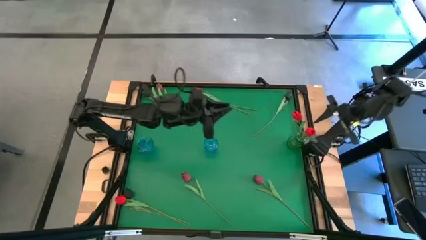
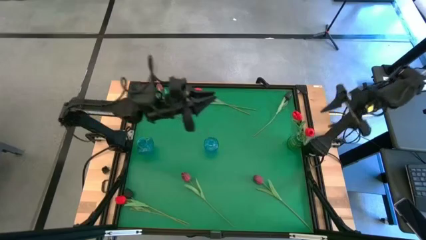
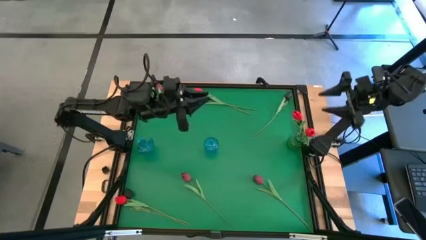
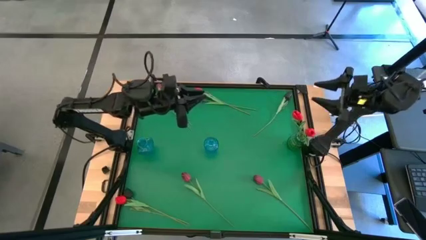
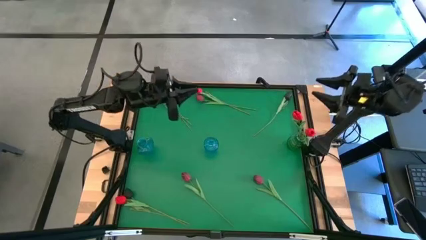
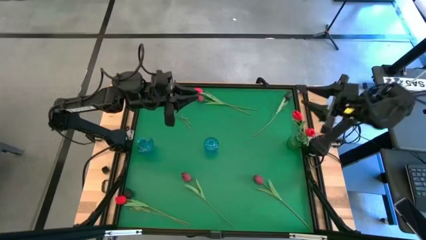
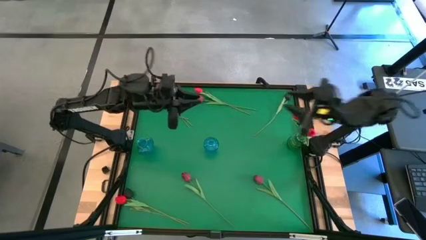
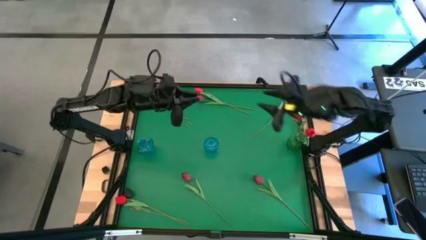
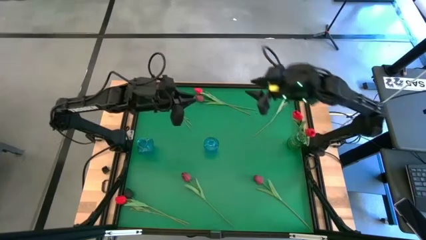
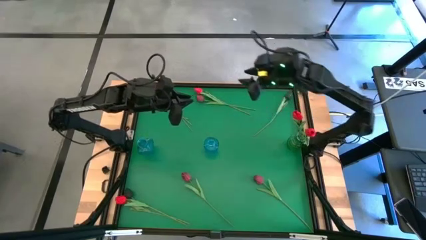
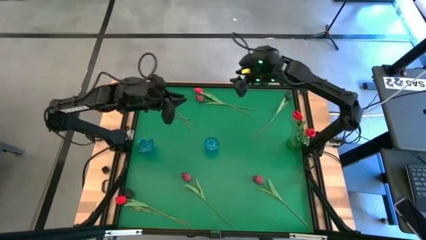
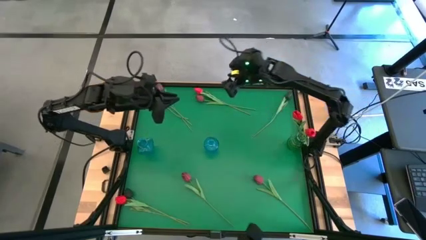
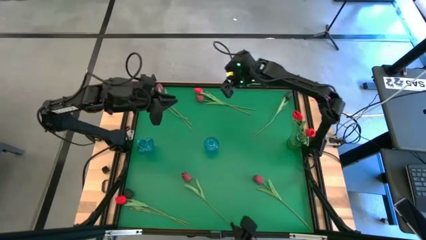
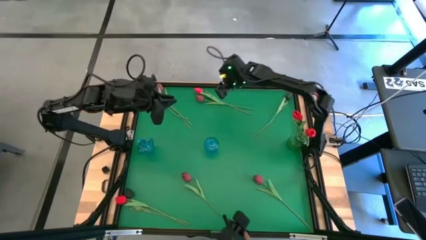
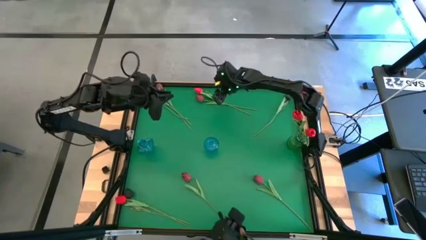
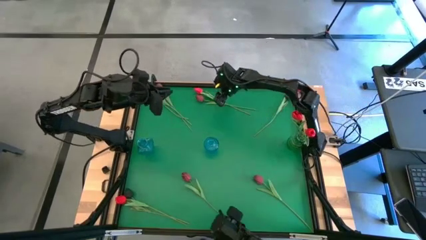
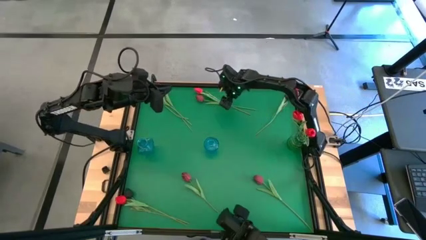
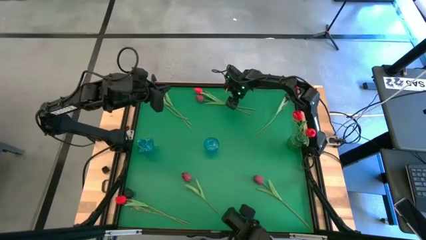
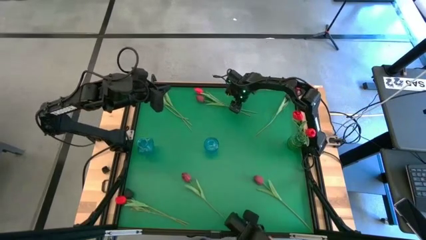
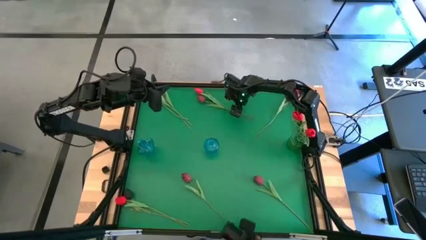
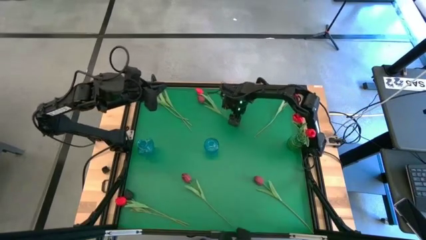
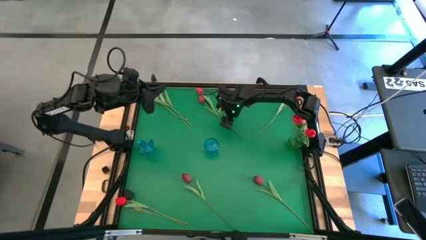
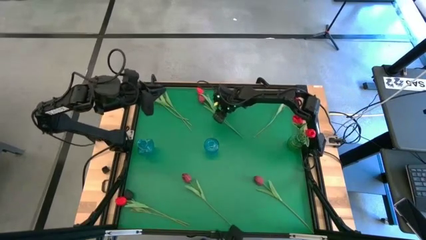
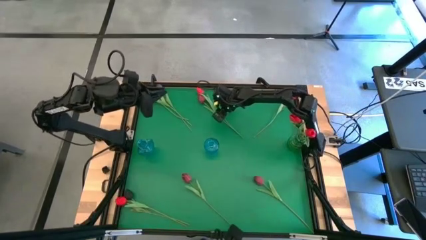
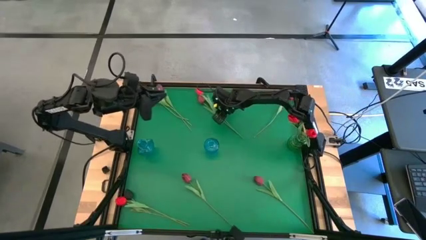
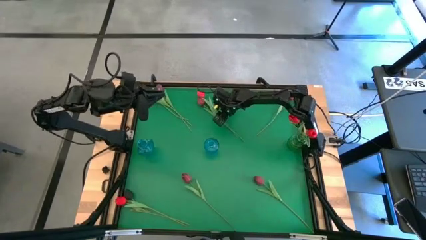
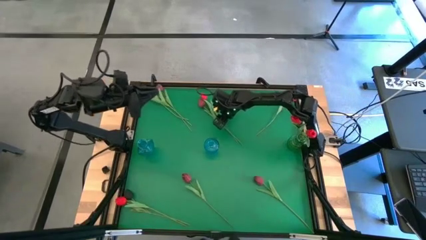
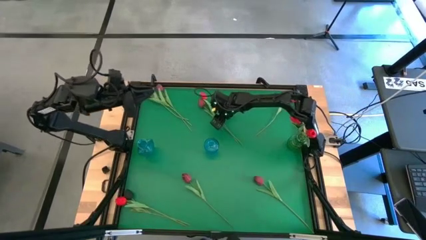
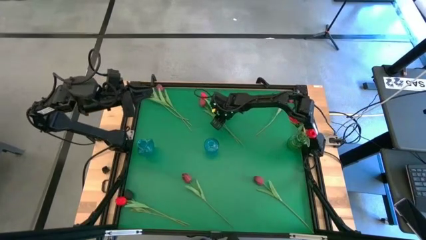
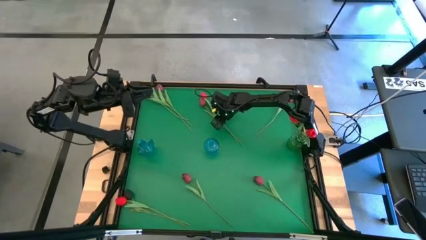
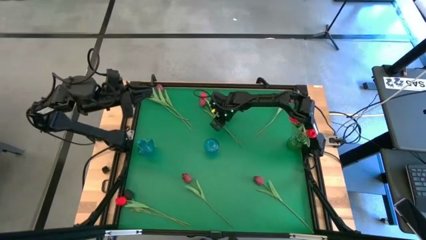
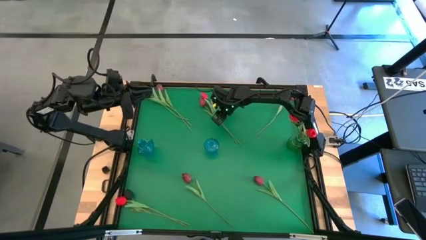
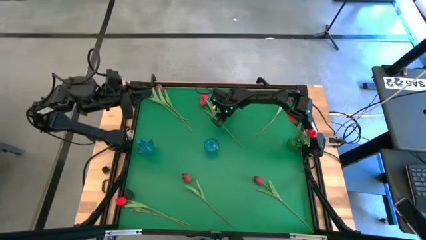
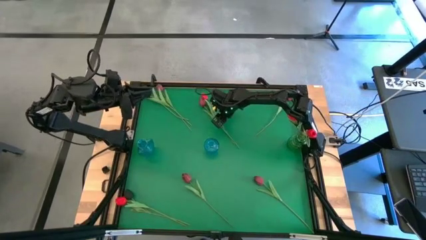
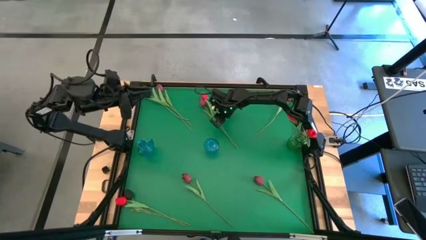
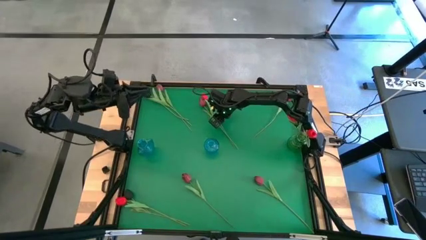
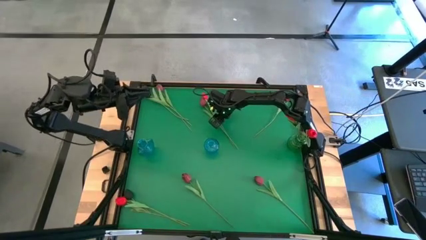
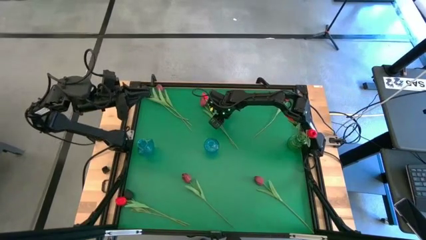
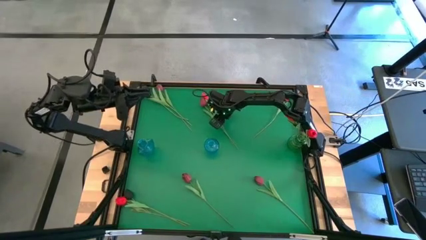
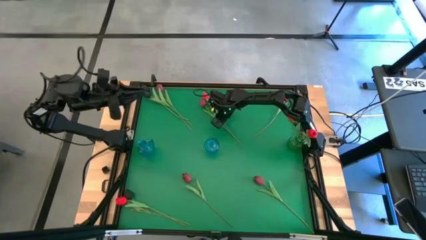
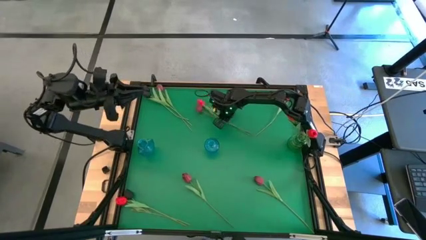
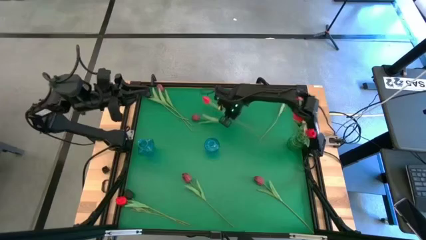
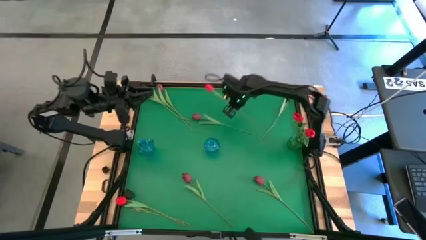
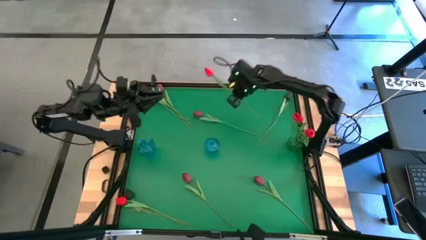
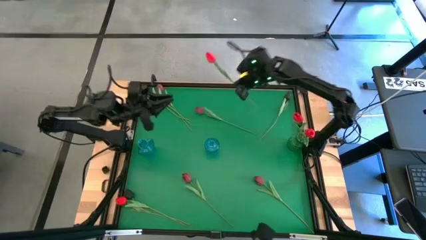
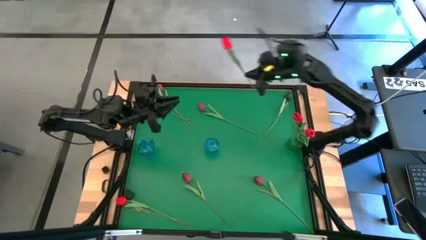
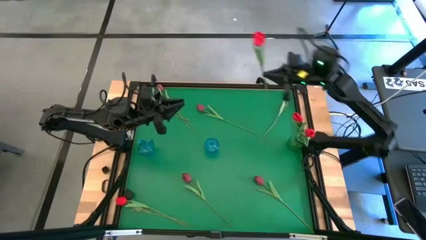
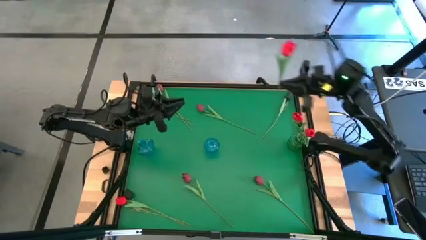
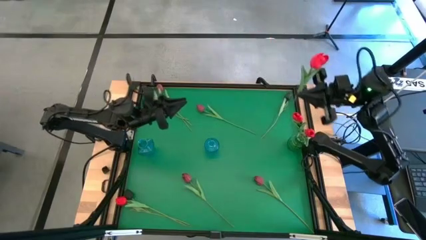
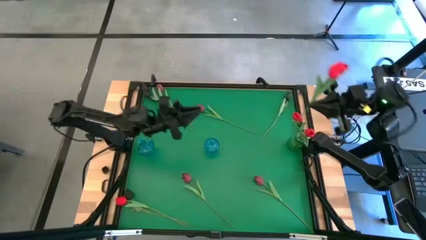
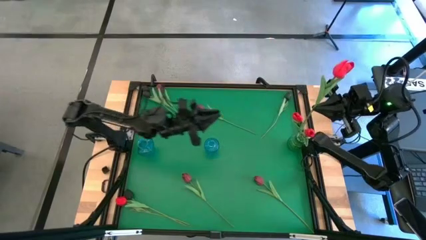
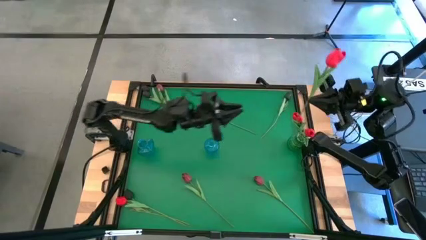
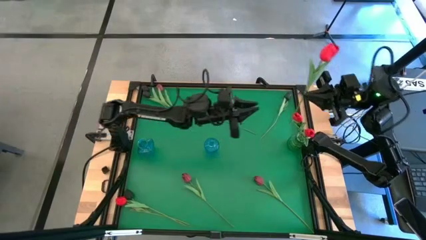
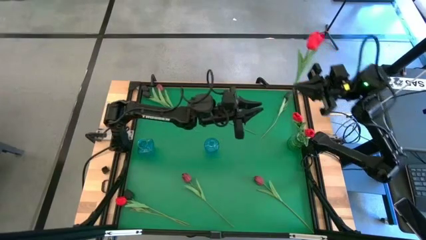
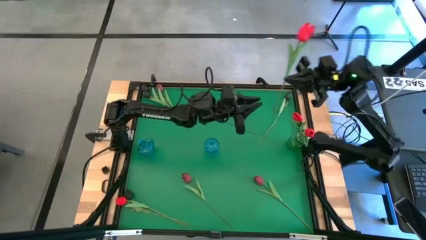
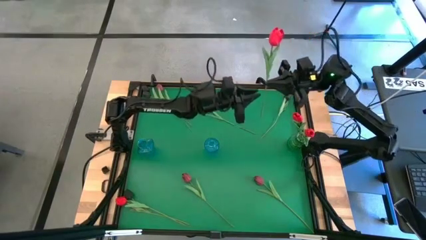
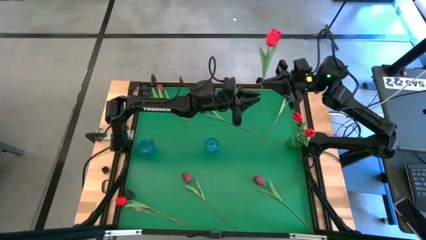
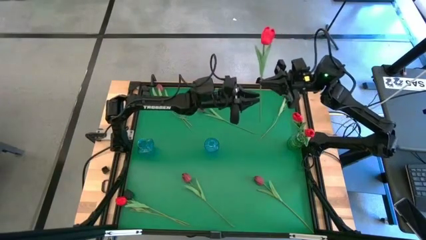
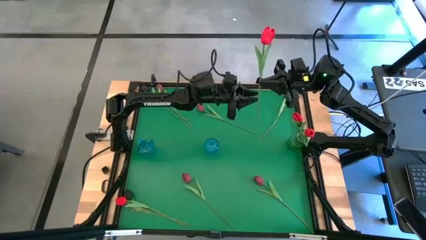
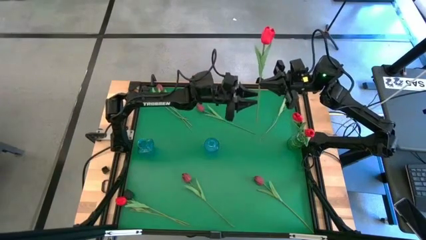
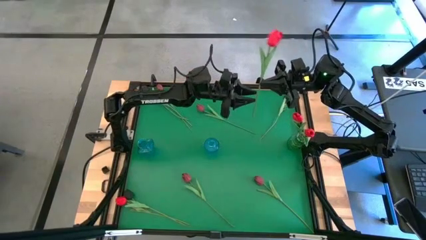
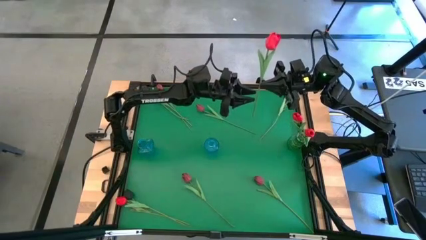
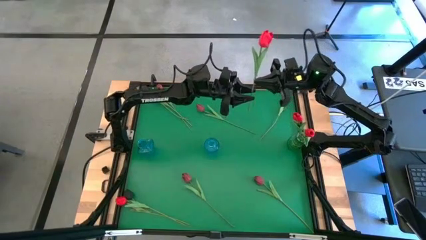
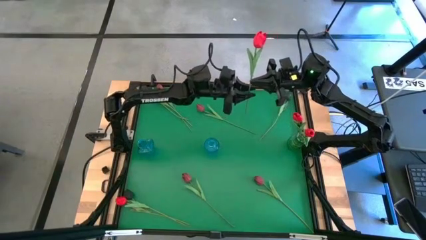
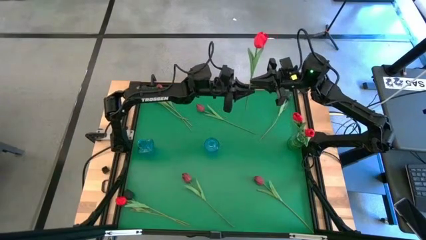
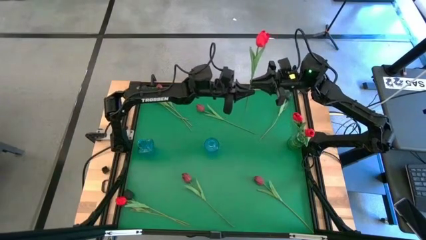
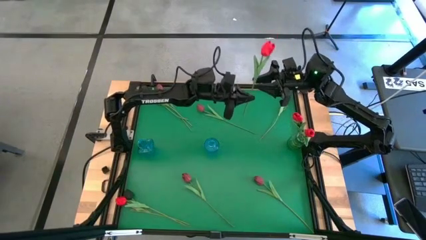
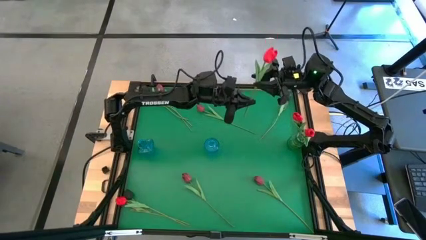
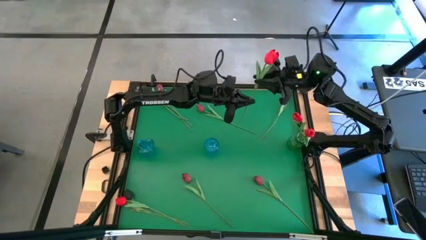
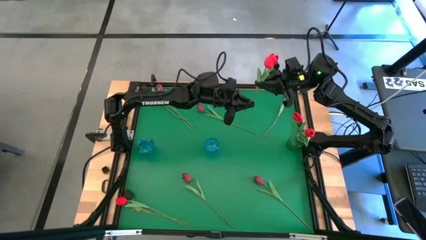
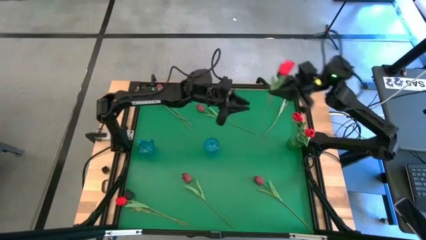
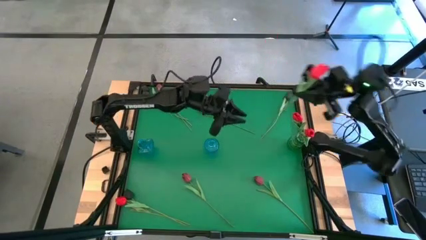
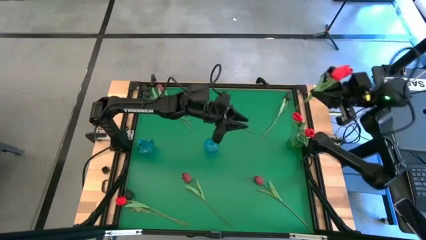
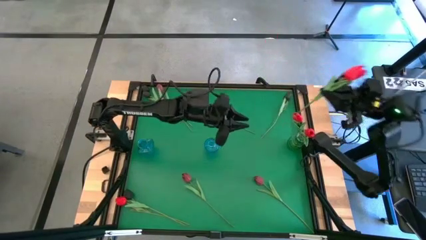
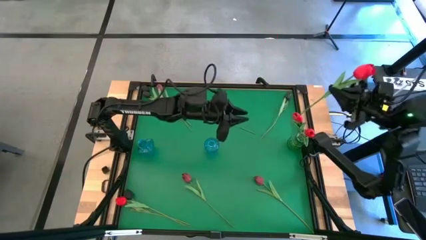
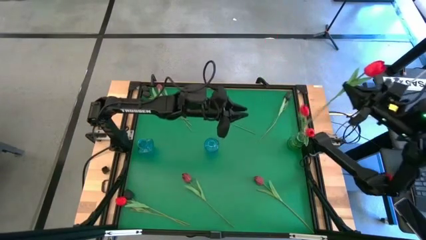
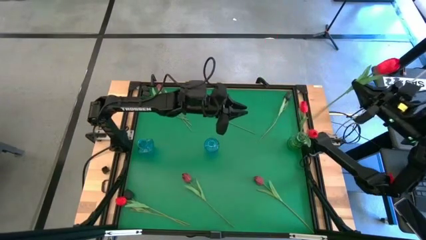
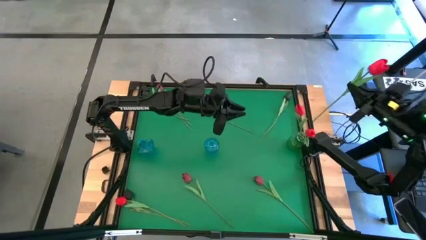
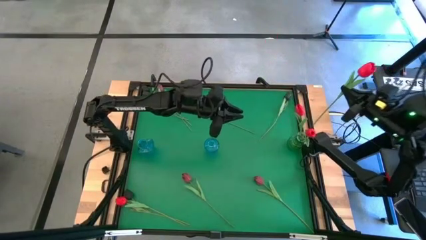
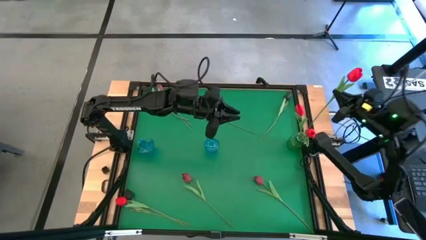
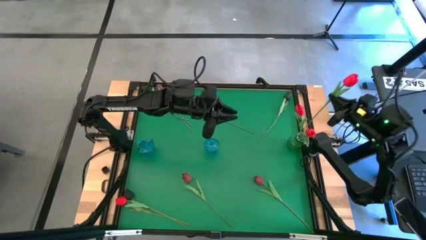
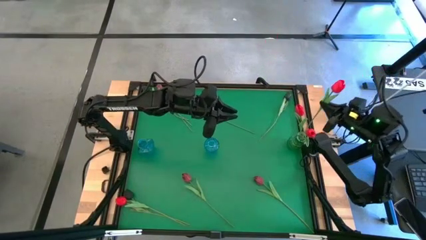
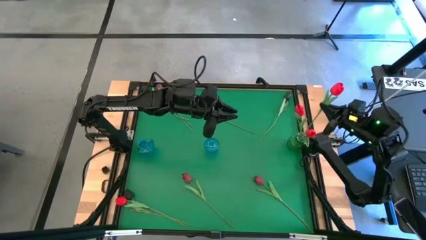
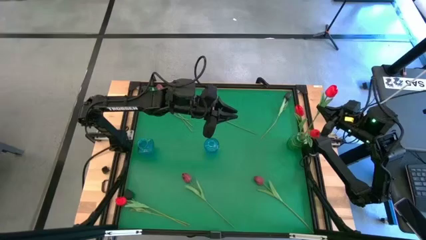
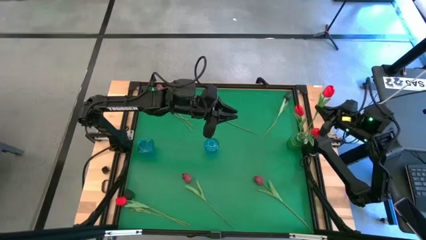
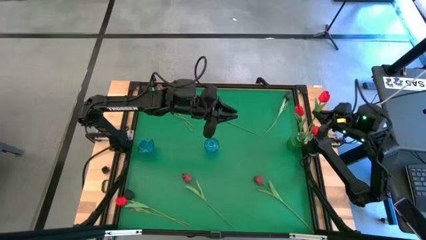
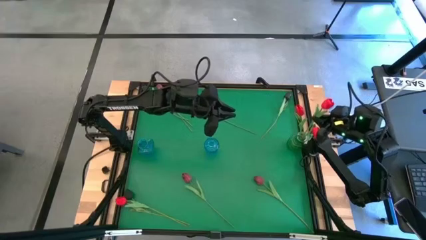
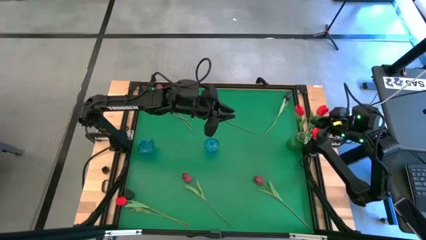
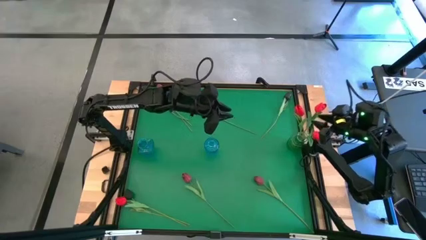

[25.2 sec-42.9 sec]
Task: Sort flowers into vase by color
Put the pink flower into the green flower vase
